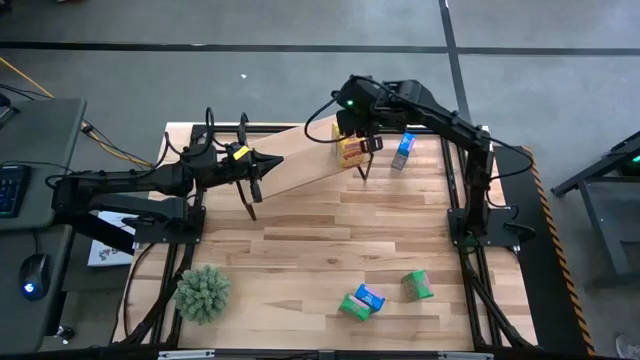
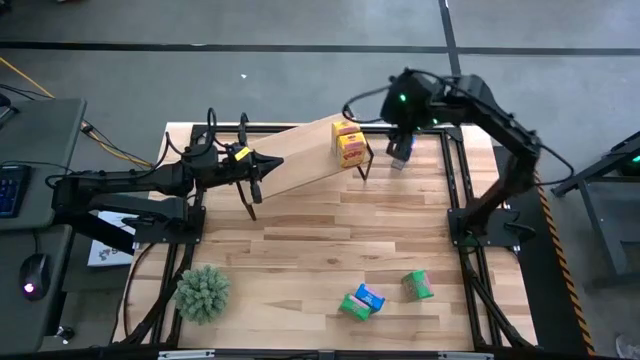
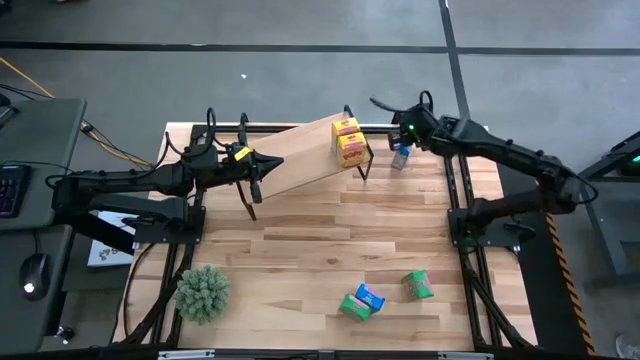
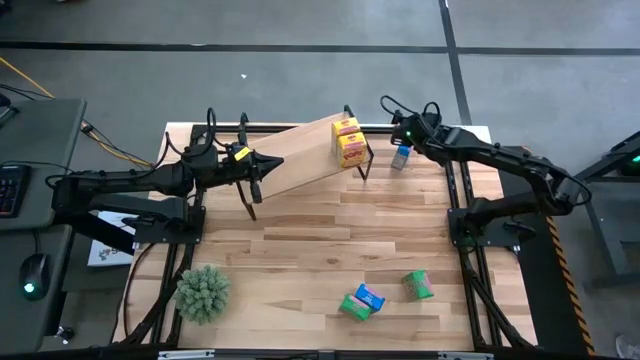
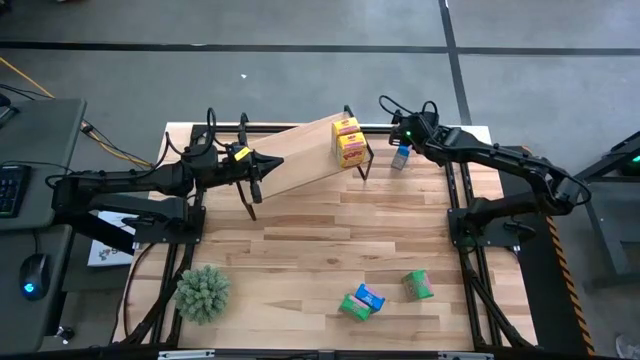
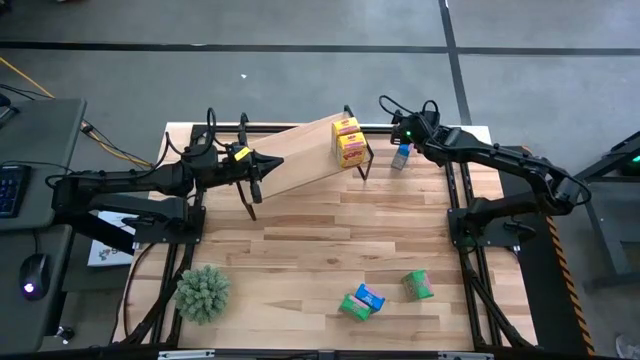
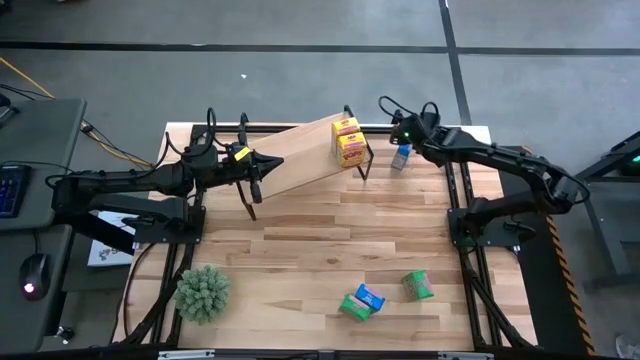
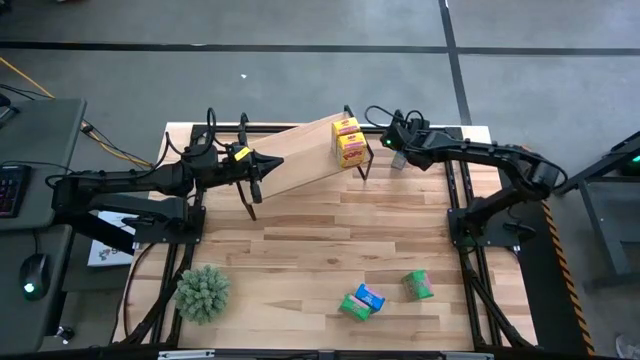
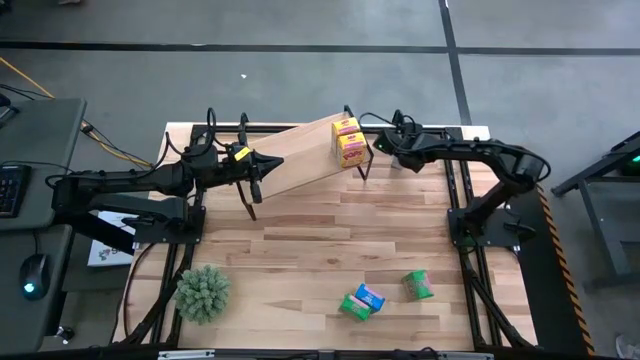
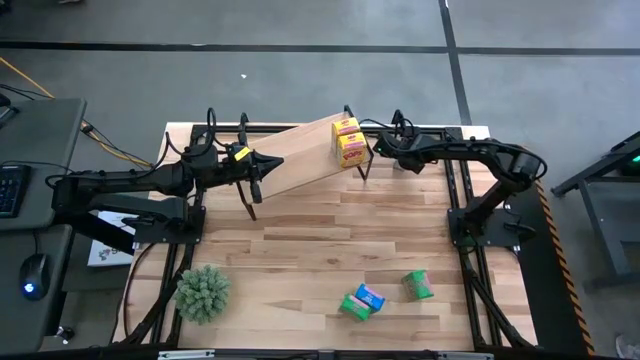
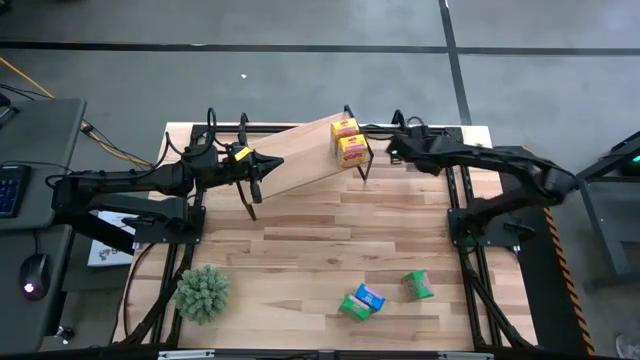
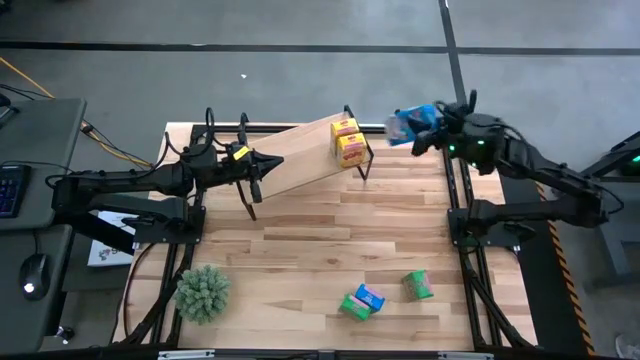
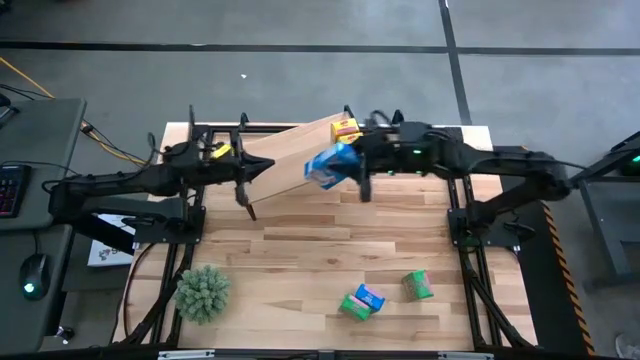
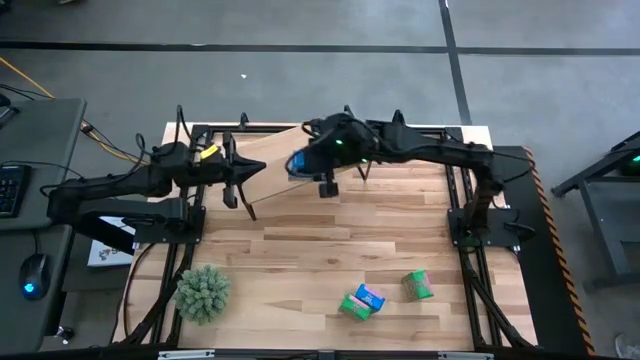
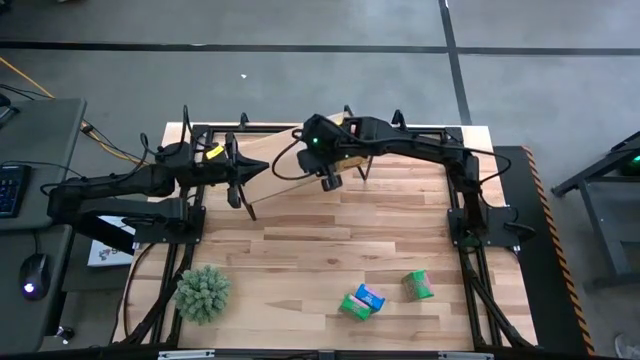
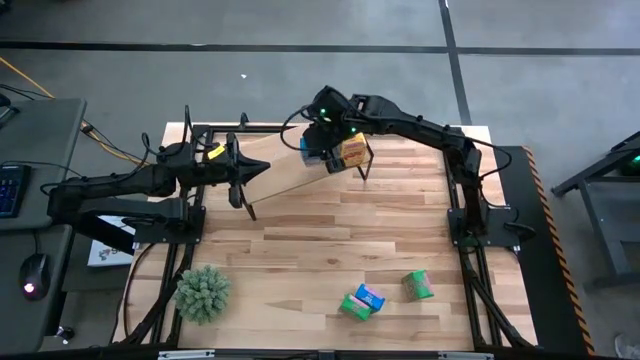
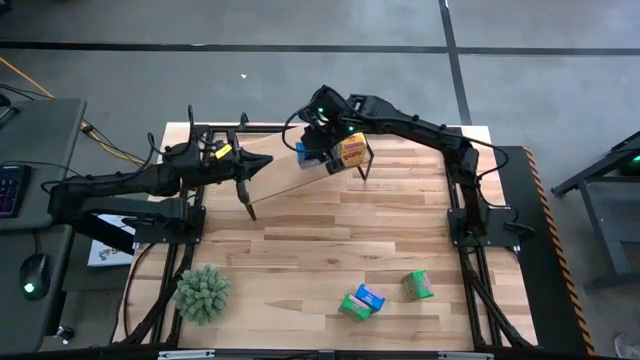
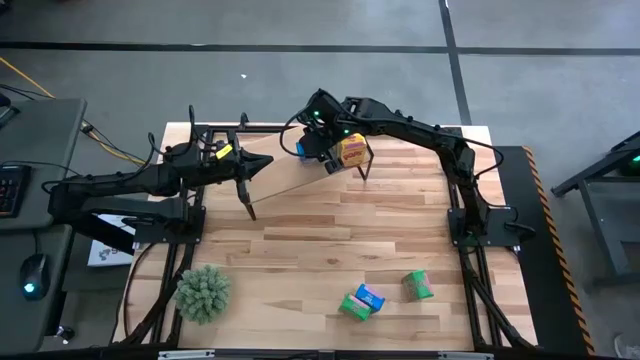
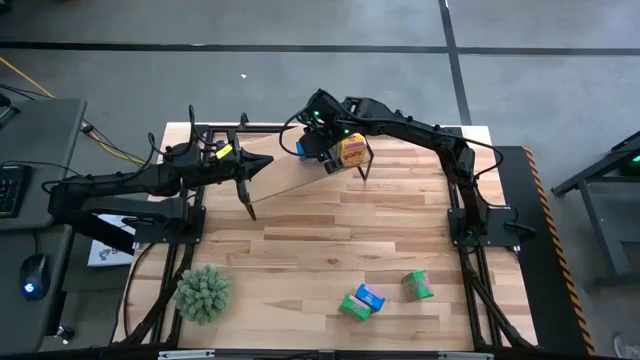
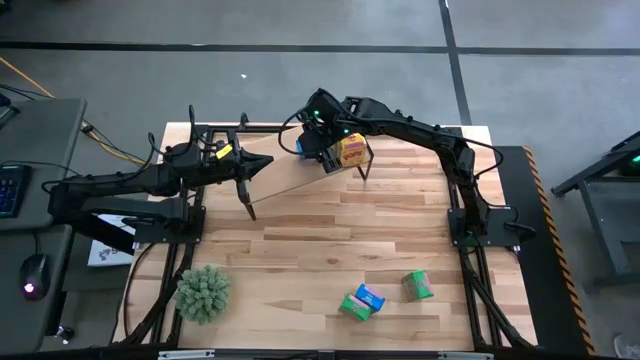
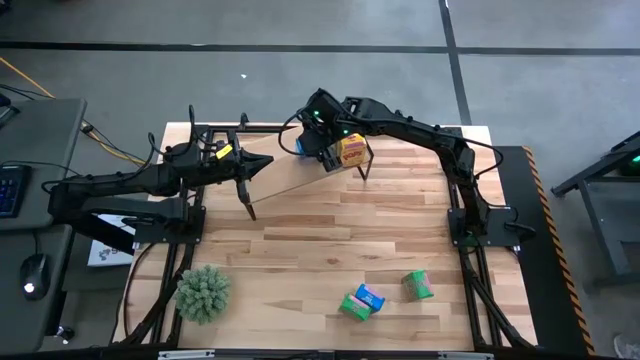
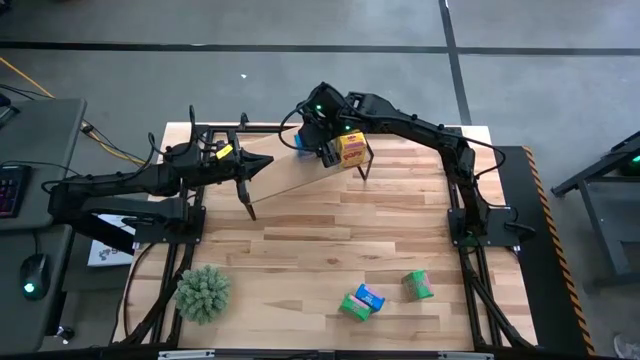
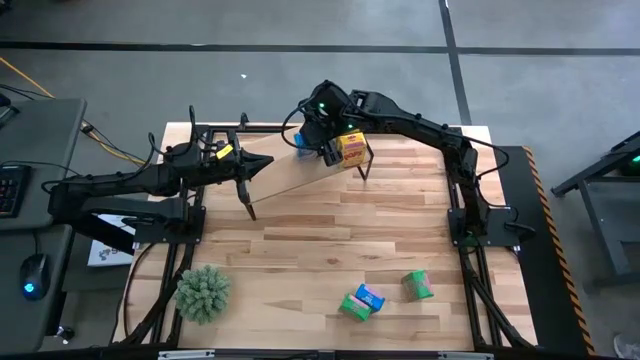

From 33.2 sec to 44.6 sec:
Task: Stack cereal on shelf
Put the top blue cereal box on the shelf

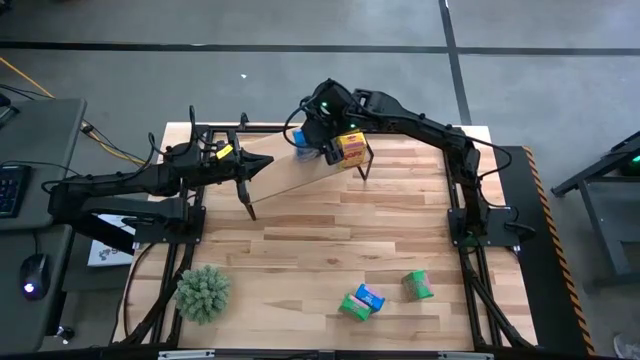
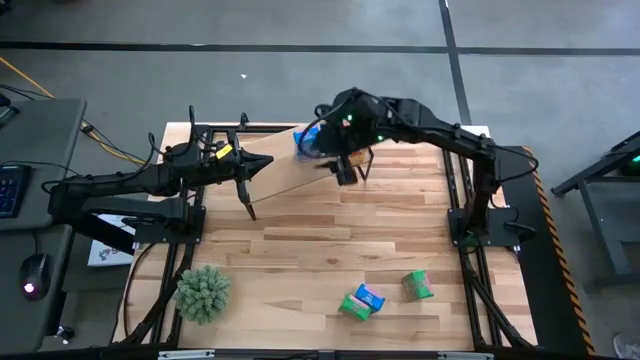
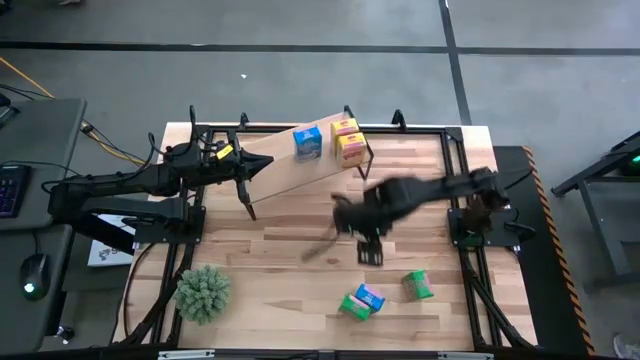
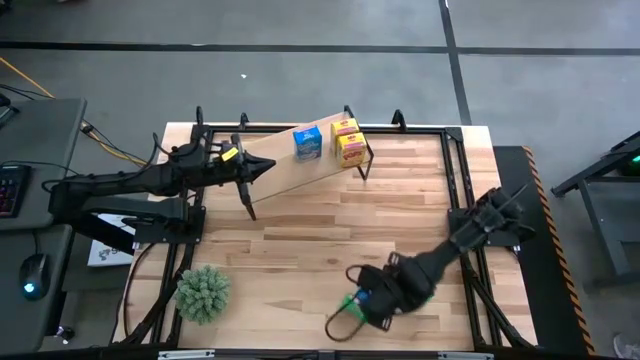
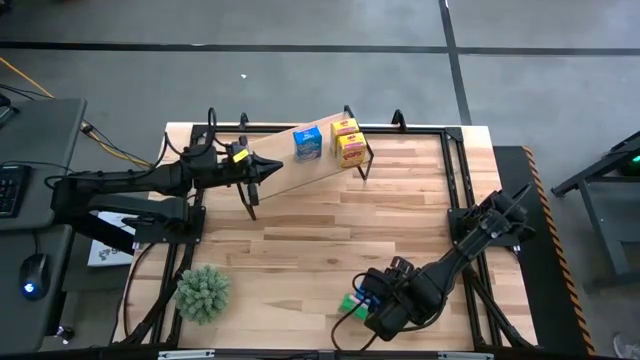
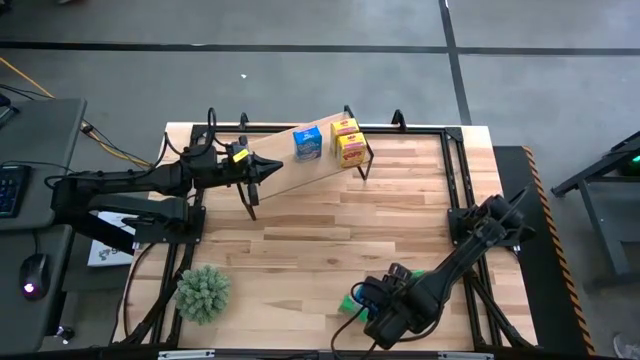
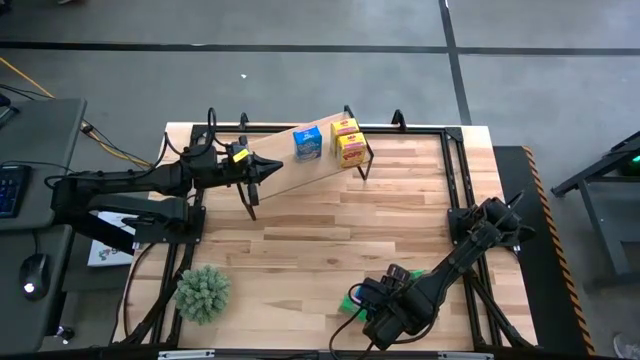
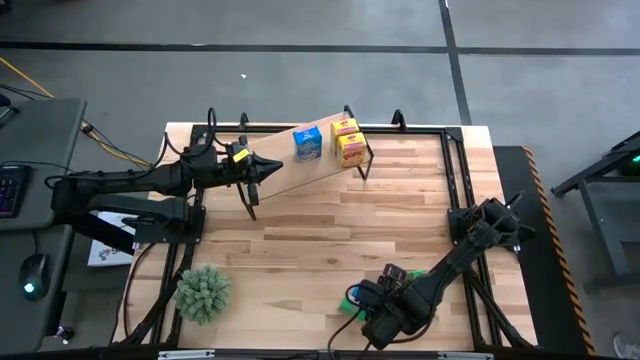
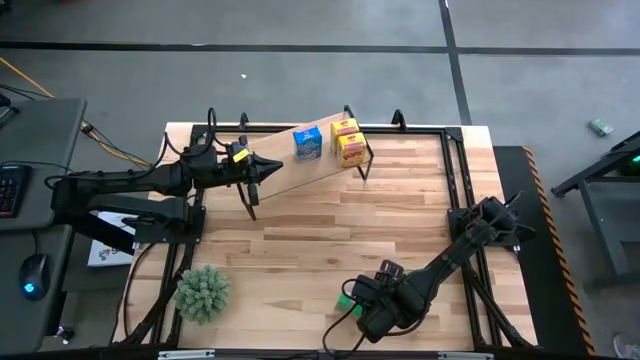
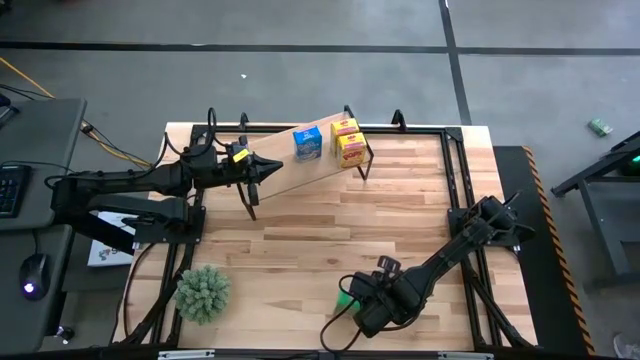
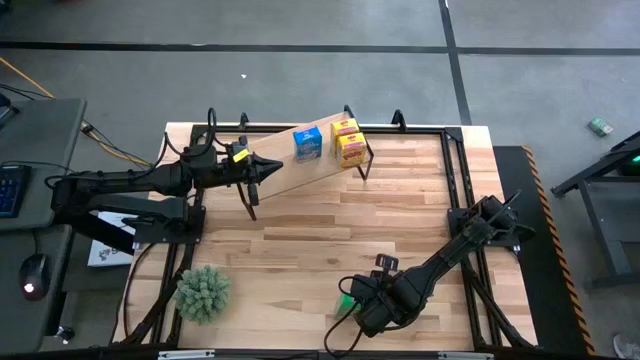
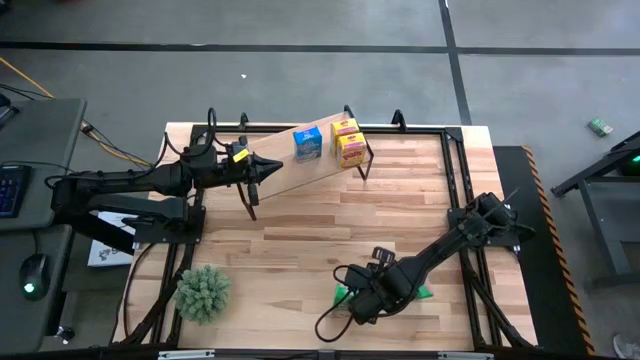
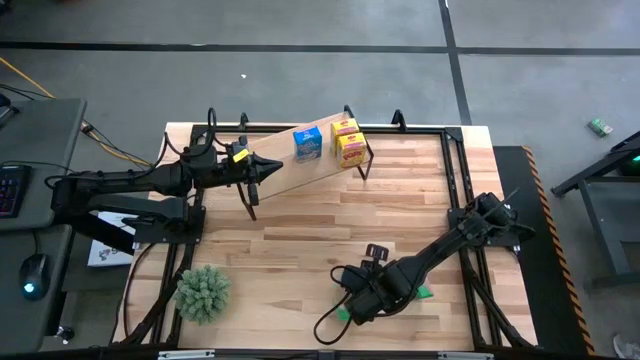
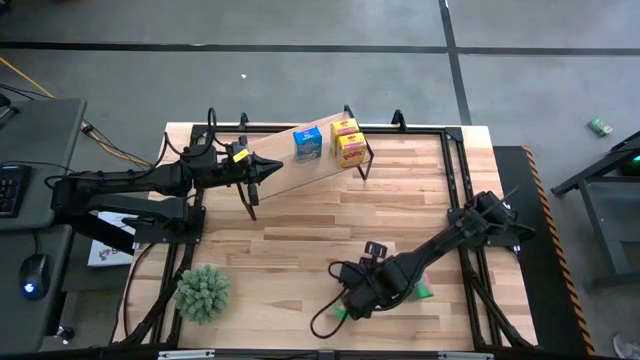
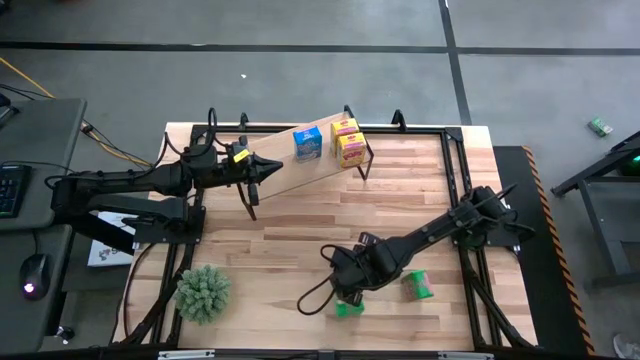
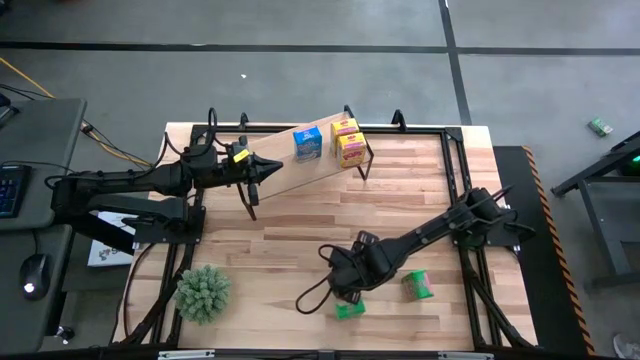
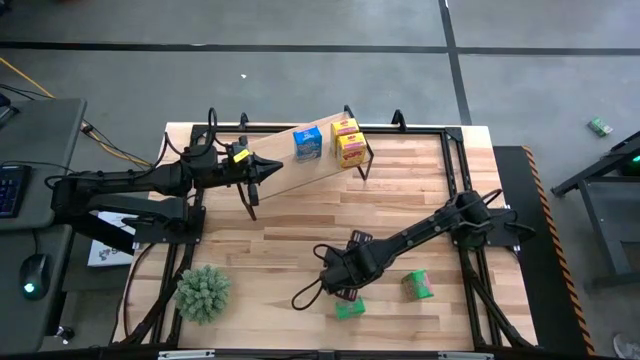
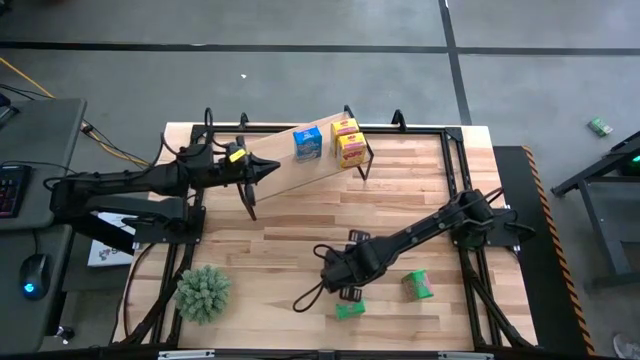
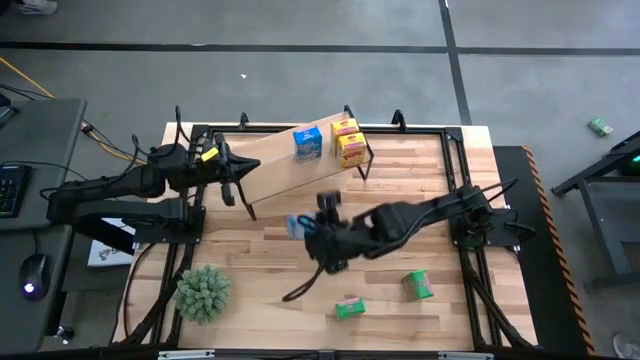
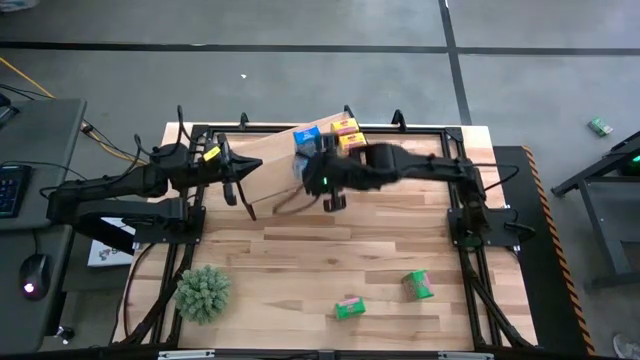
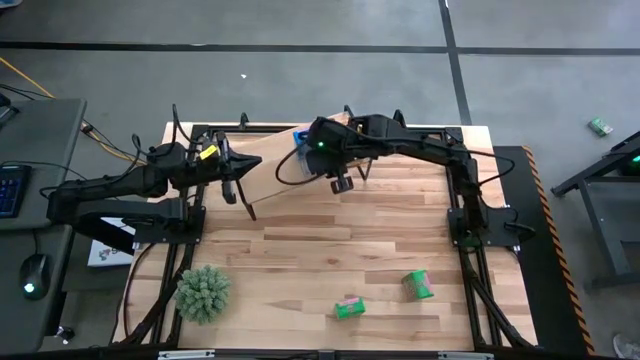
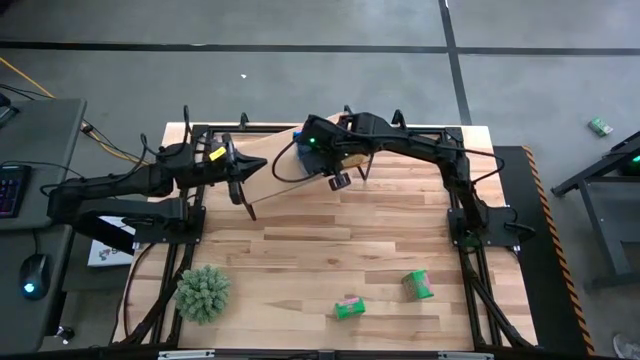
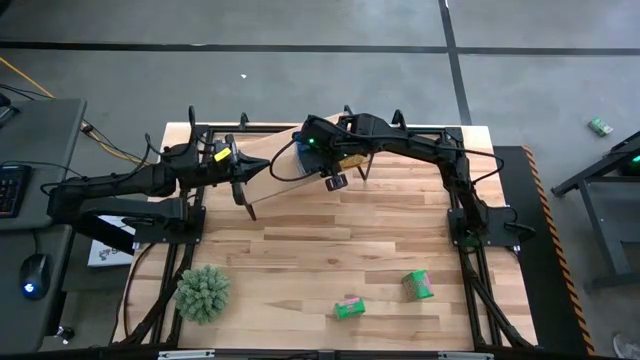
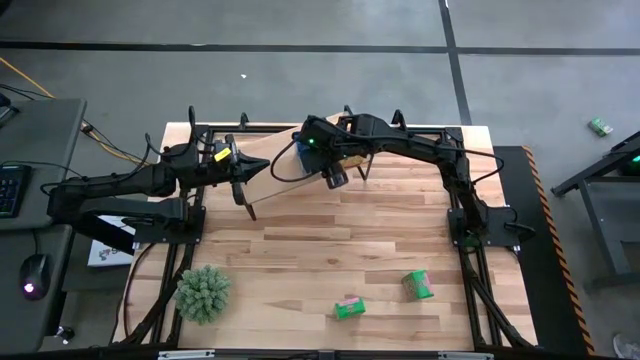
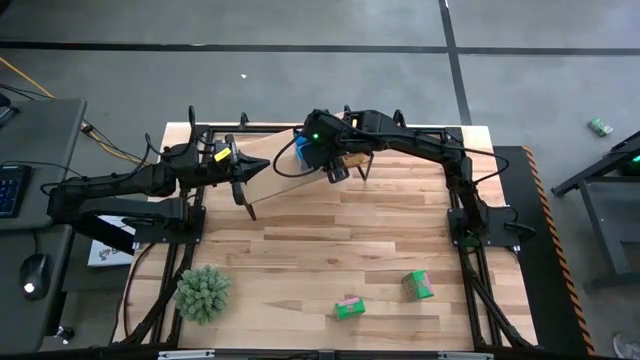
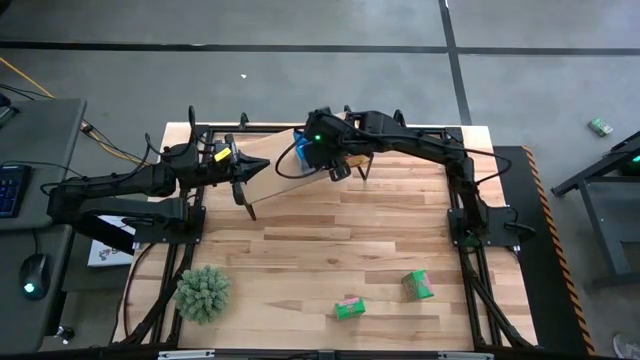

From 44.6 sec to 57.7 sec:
Put the blue cereal box on the shelf aligned with the blue cereal box
